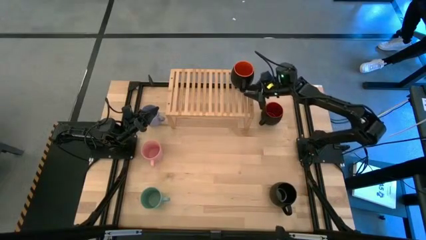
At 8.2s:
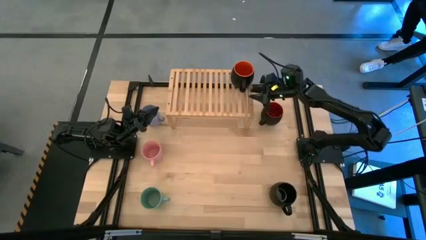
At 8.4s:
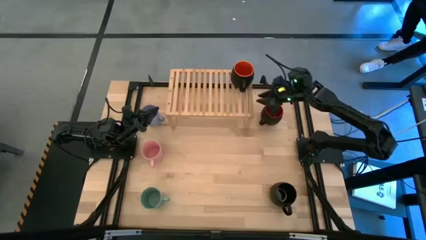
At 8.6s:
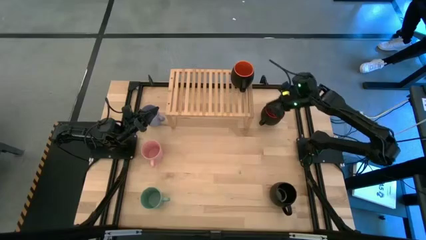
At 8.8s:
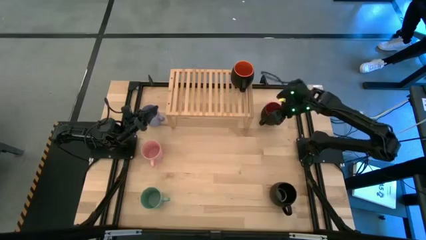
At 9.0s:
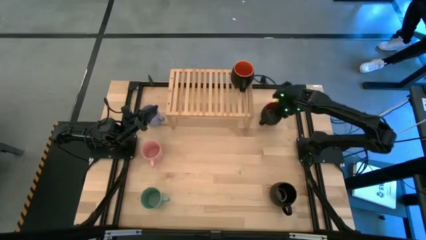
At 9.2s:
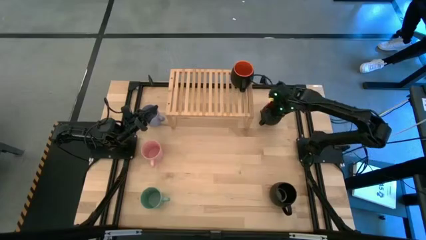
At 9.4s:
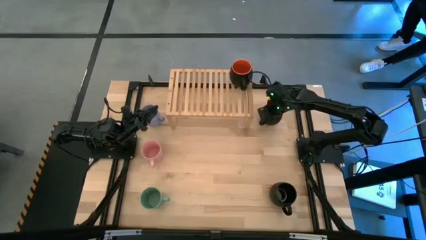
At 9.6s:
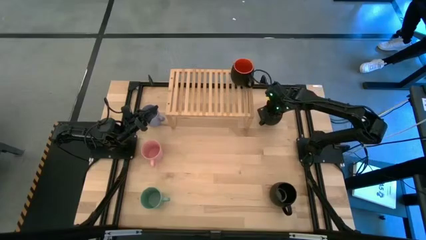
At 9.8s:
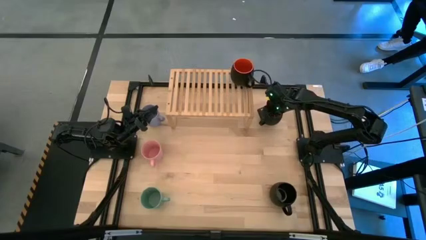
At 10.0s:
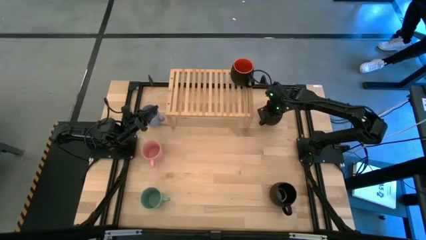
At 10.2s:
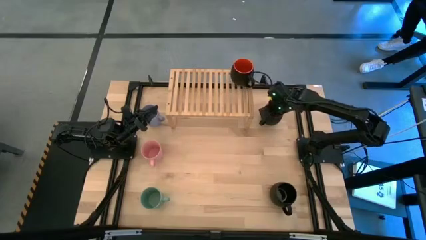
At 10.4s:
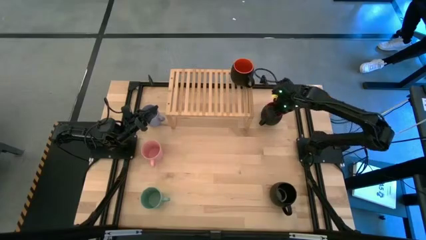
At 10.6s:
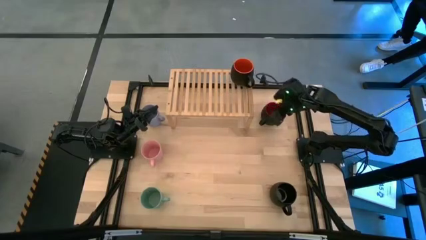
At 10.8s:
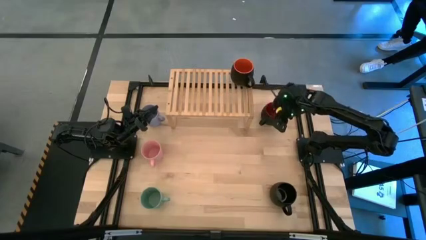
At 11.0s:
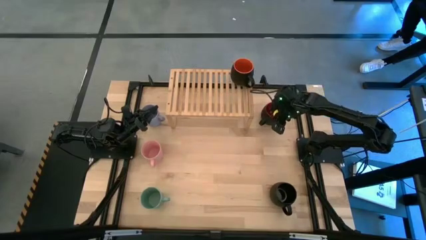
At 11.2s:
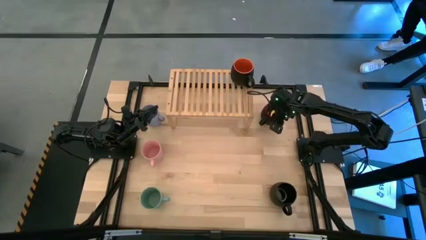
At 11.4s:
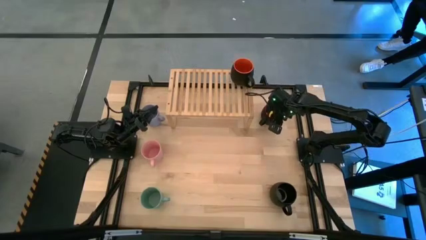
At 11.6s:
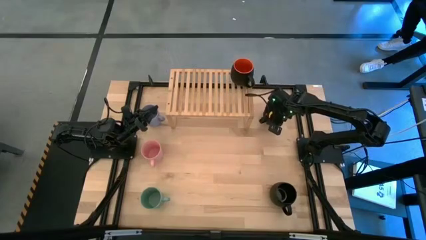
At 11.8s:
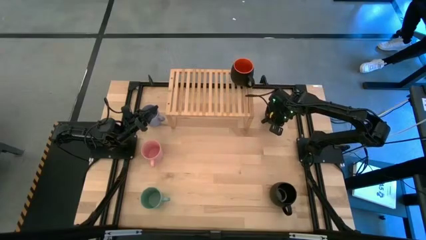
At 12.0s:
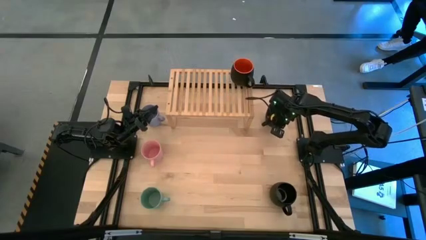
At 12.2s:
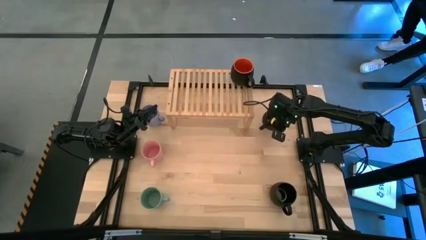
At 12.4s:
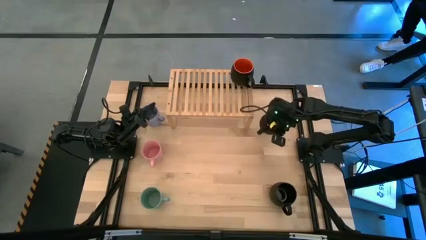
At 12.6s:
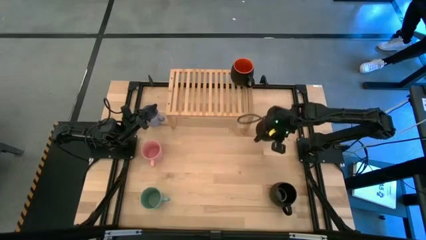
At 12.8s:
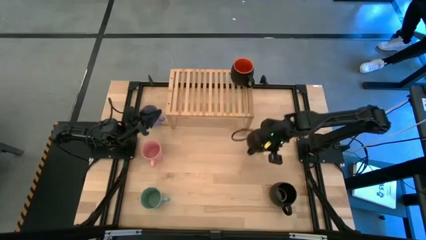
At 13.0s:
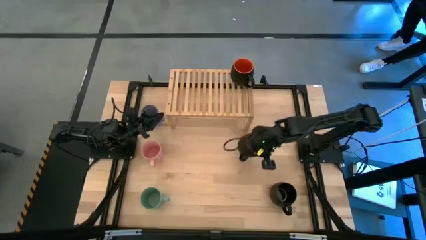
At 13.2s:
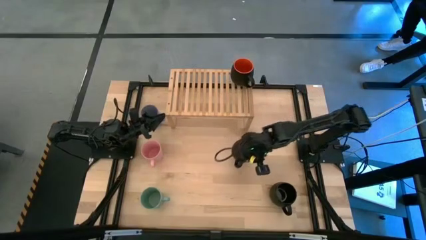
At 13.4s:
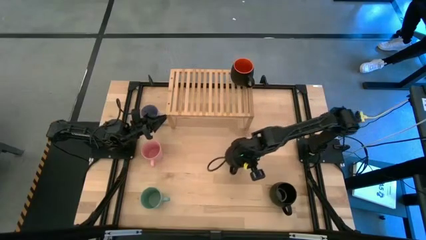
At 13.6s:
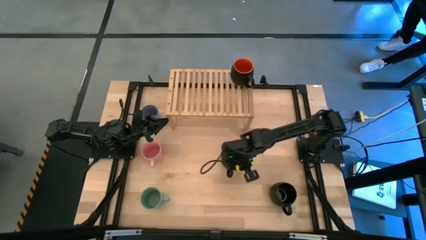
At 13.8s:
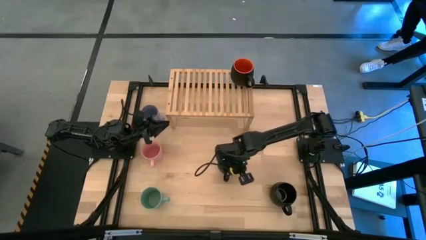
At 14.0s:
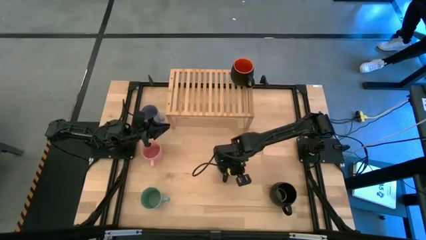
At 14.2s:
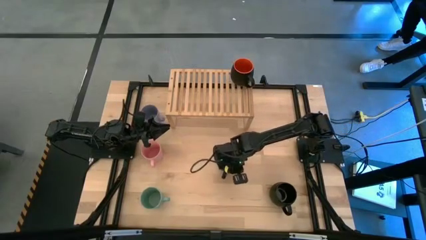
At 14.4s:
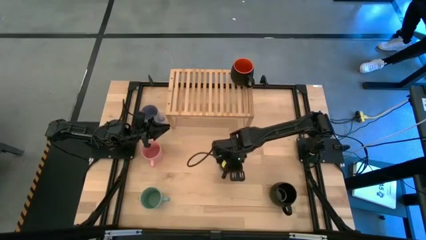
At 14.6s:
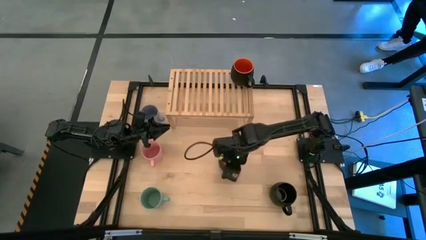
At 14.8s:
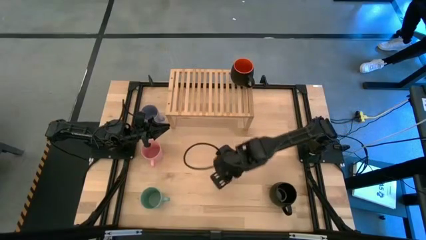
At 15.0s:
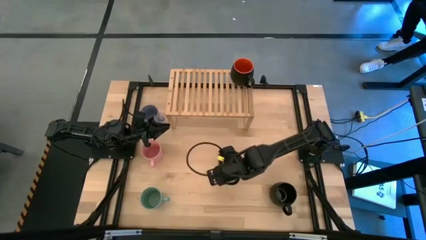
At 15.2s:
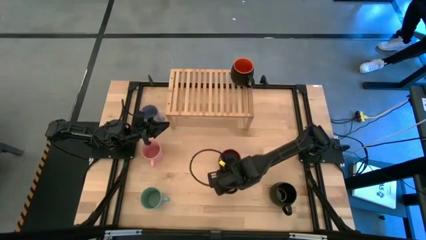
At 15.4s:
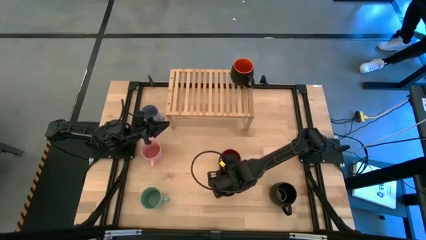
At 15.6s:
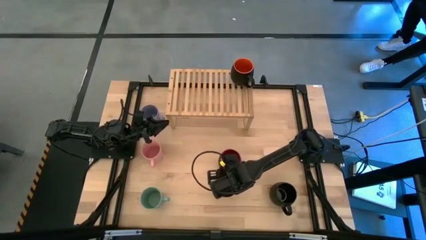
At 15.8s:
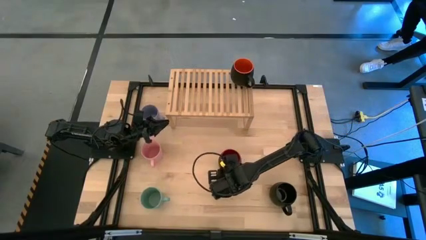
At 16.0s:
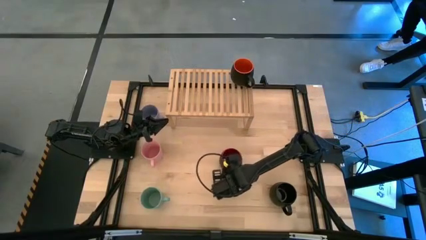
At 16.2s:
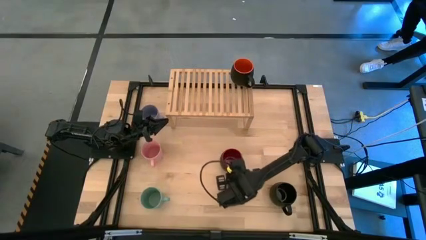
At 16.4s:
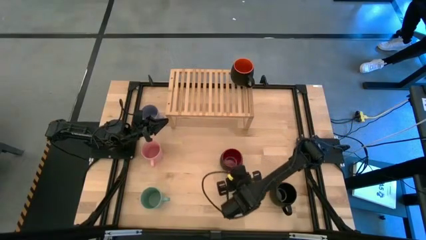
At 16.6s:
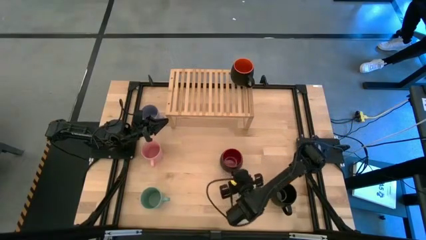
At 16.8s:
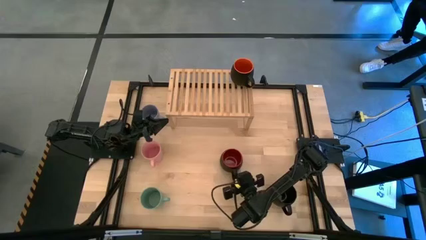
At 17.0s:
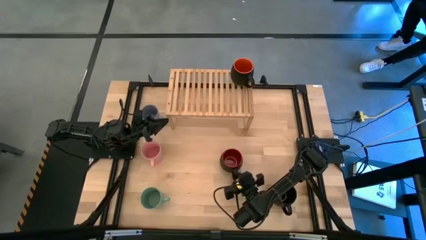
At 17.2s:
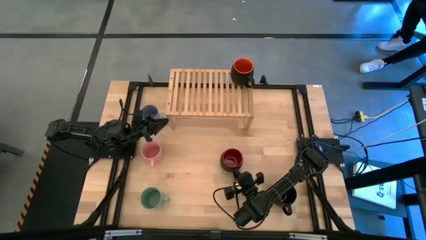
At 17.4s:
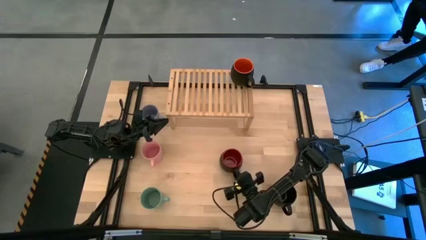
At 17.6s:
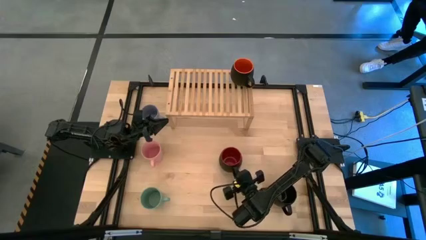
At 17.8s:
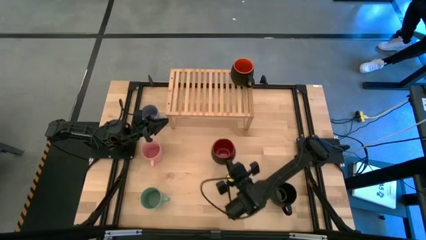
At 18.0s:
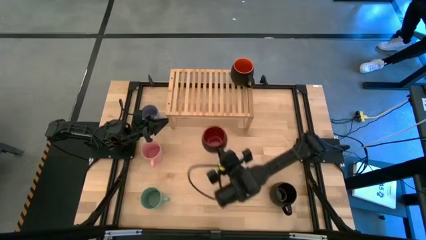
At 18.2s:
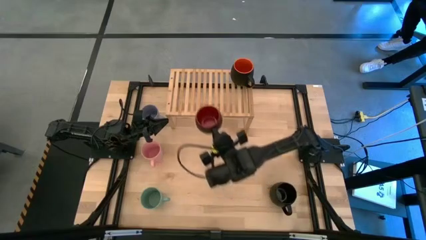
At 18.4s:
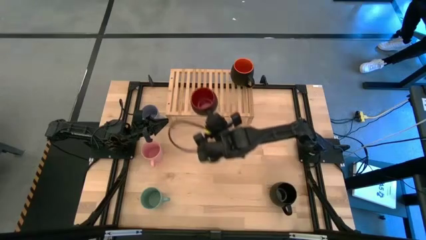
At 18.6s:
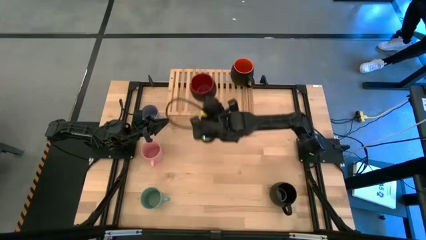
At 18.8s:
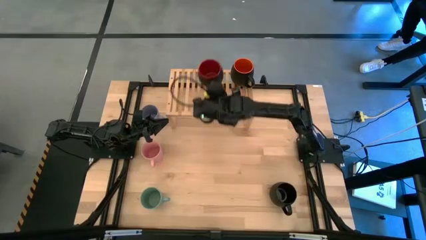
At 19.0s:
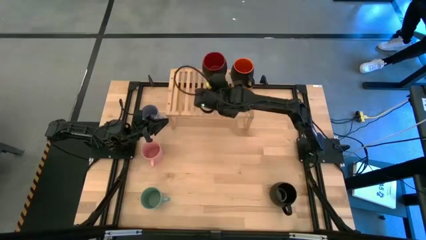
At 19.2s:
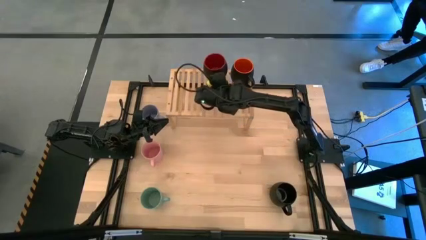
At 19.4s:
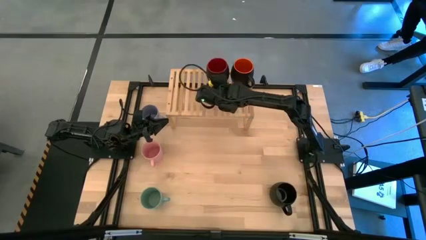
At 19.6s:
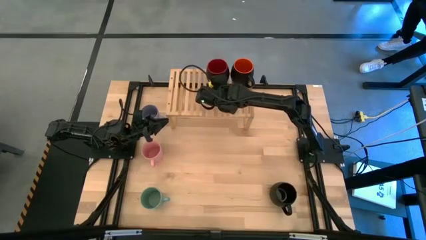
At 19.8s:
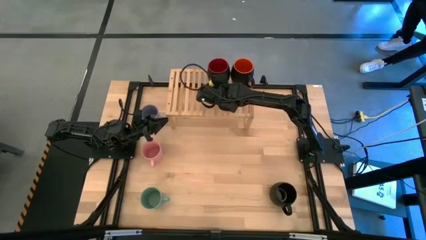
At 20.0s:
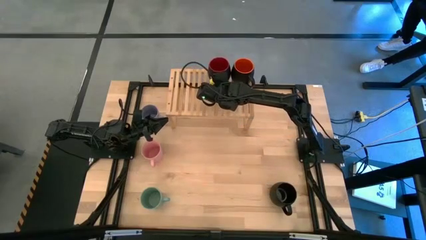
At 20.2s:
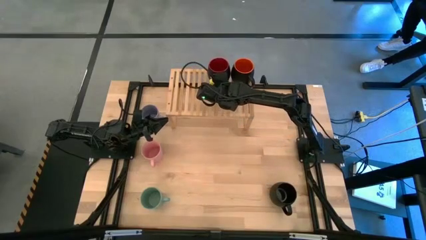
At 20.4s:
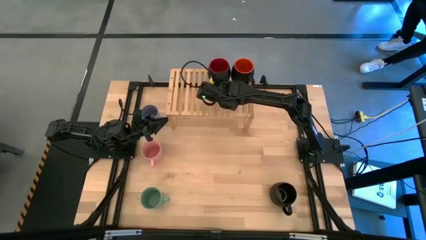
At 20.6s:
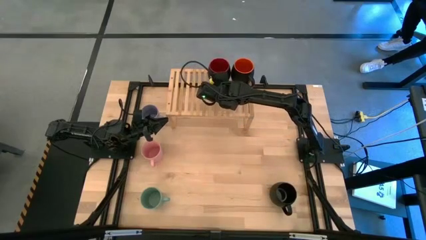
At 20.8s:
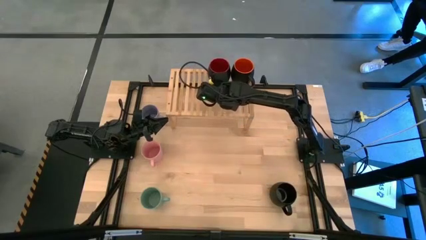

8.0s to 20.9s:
Task: Place coffee mugs
Put the top black red mugs on the shelf

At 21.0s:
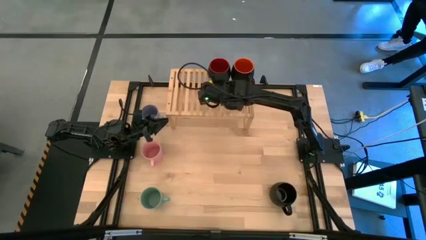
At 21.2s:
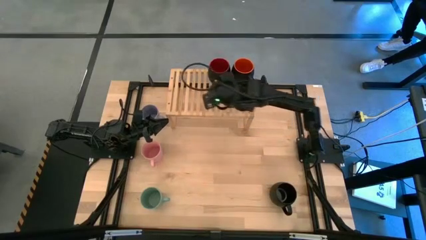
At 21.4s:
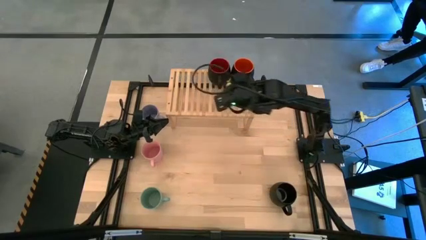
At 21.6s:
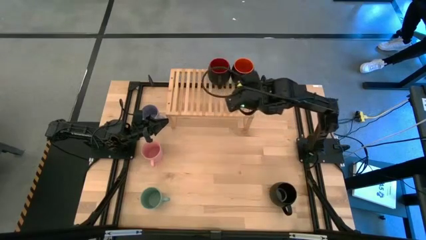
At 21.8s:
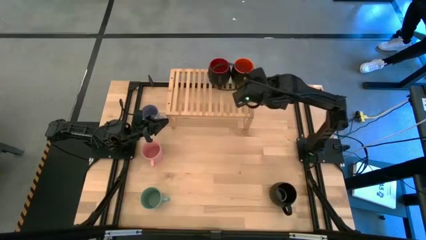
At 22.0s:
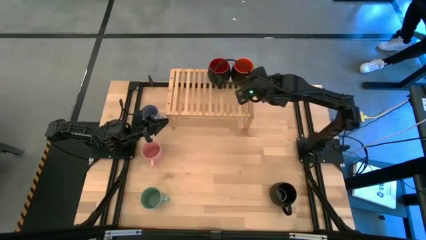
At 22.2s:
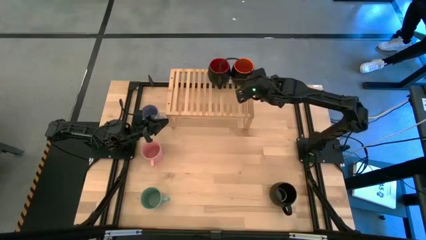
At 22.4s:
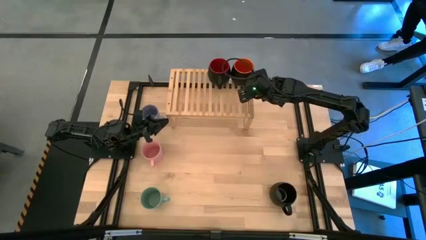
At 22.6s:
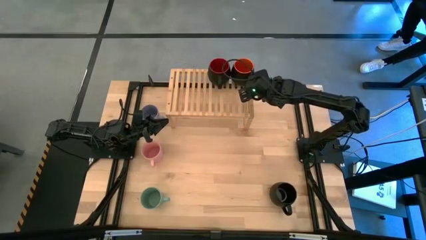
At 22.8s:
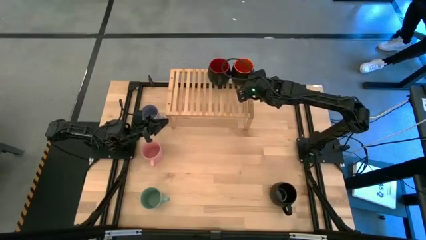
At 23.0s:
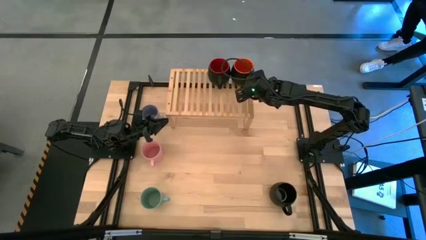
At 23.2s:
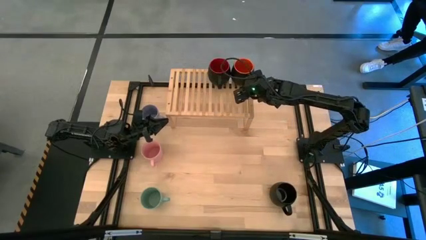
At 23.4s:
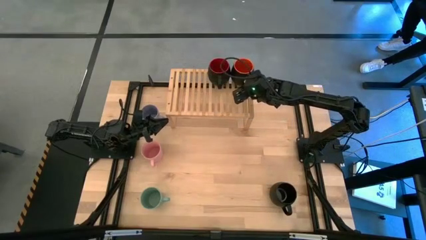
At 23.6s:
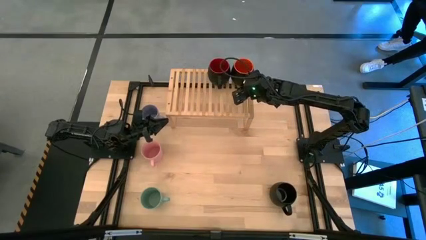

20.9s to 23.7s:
Adjust the black orange mugs on the shelf

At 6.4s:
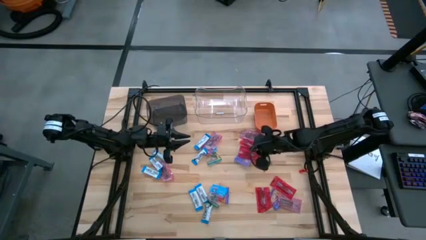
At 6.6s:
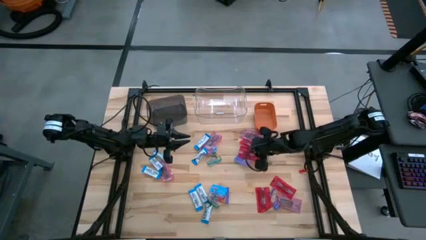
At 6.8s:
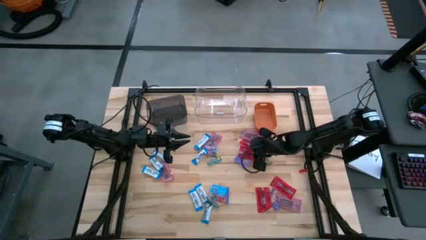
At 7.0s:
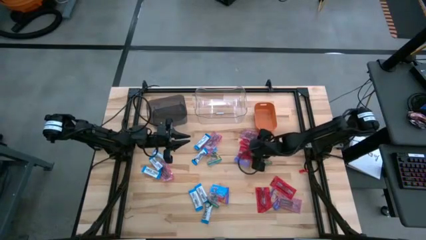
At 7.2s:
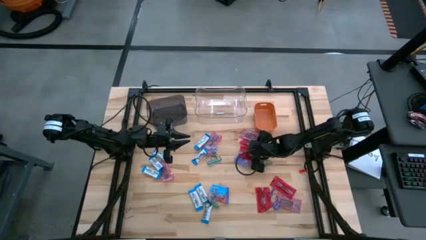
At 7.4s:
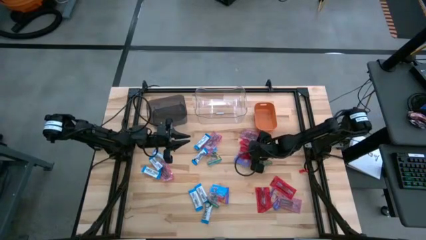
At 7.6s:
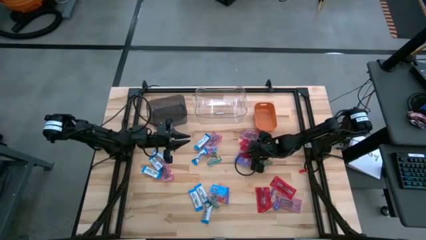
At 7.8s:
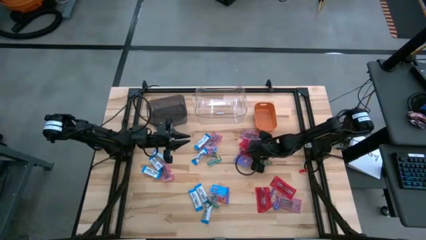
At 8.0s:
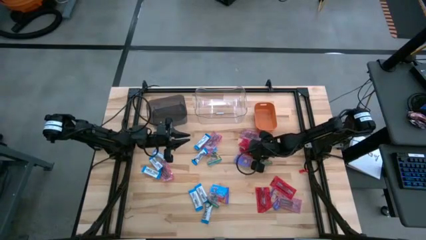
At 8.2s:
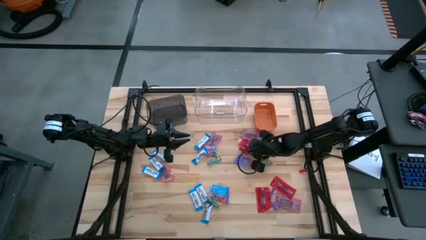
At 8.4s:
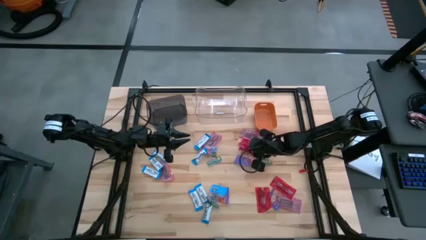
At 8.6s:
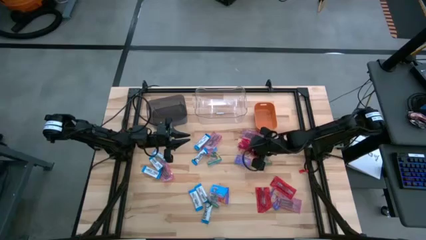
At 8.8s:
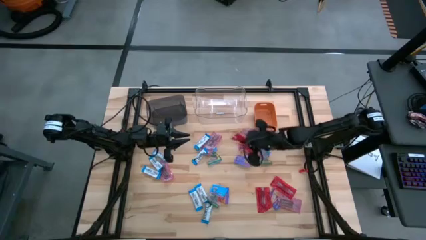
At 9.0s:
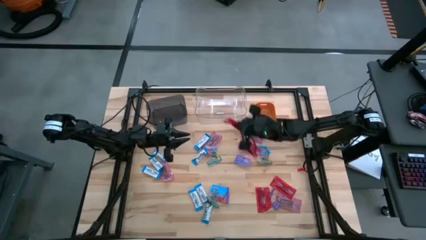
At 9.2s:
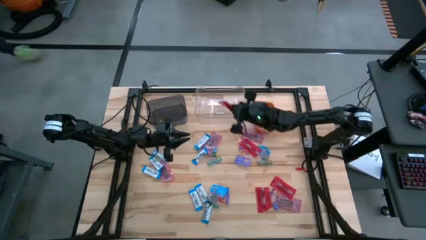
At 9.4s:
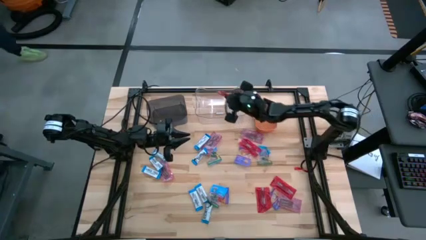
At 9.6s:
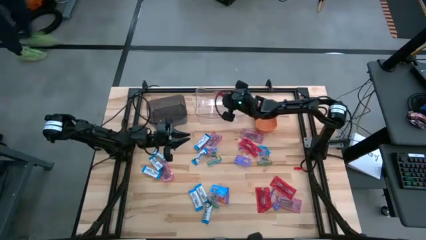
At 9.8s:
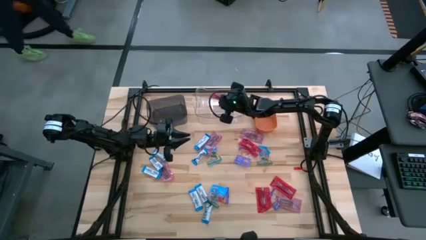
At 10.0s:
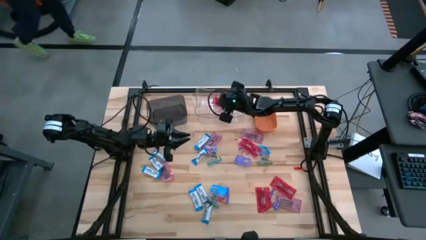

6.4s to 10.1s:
Task: Sort candy
Put the red chocolate into the transparent bin
